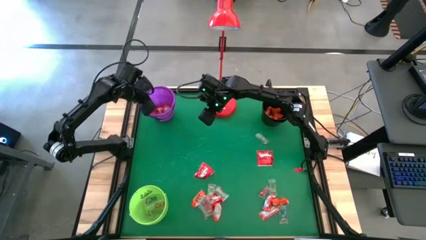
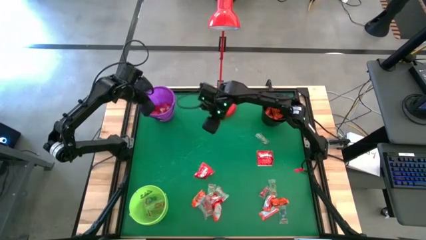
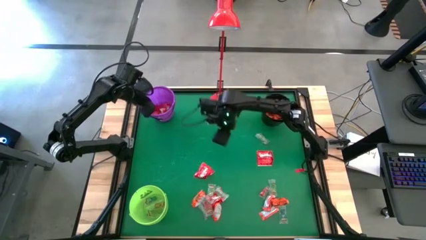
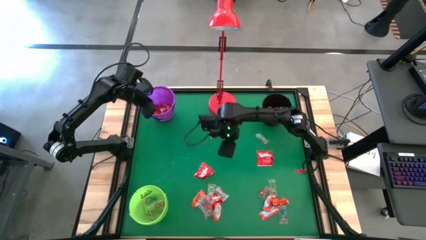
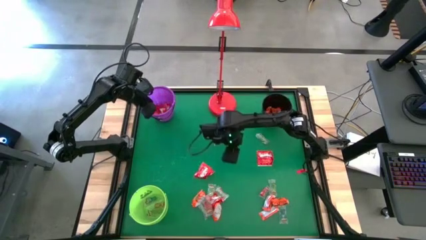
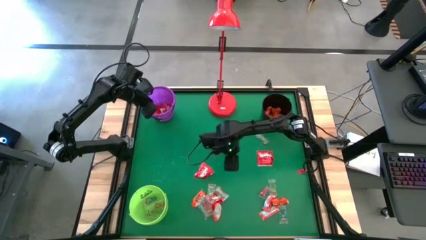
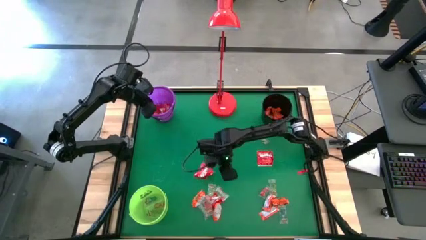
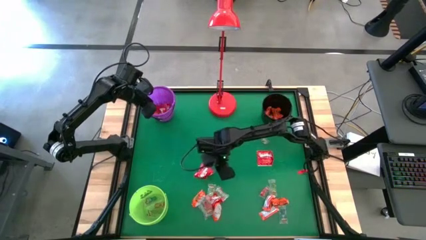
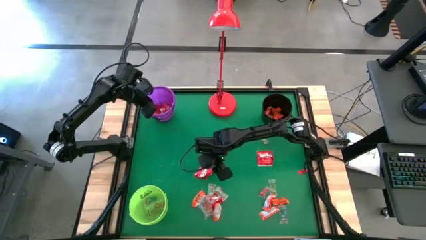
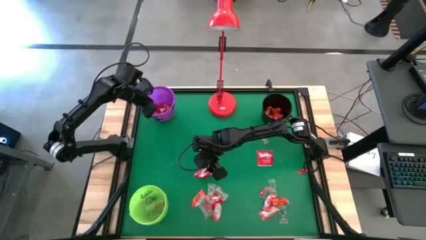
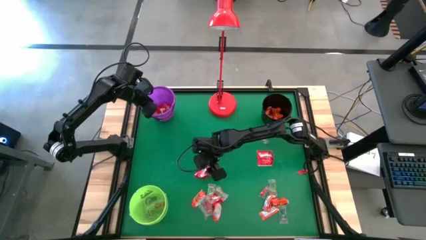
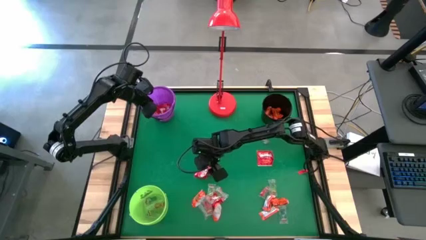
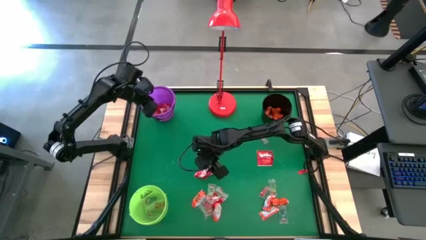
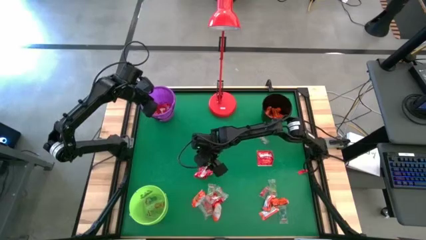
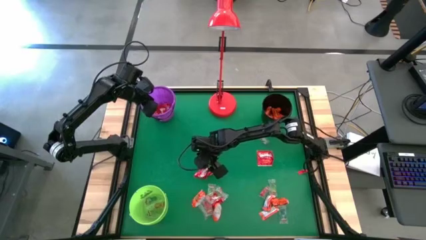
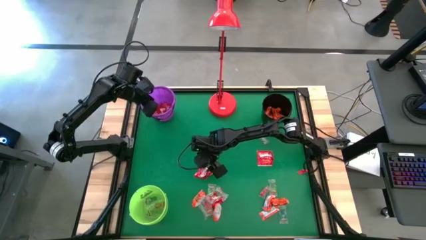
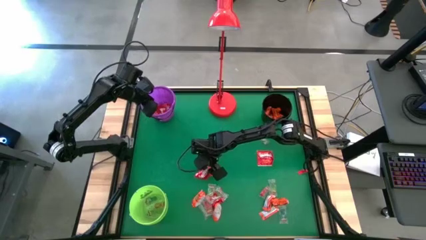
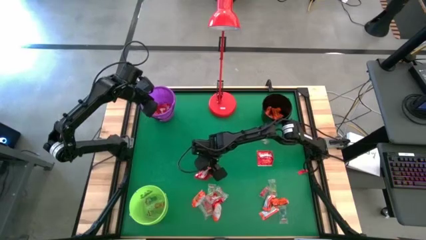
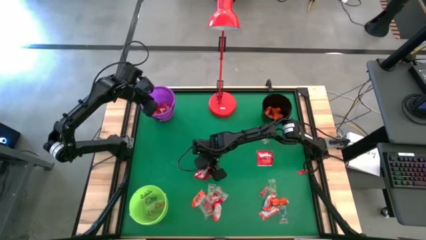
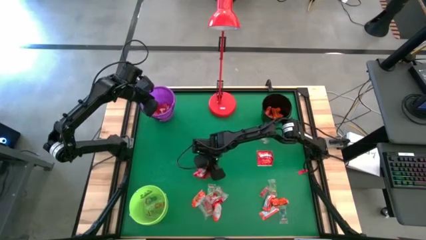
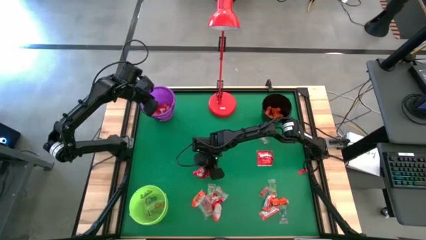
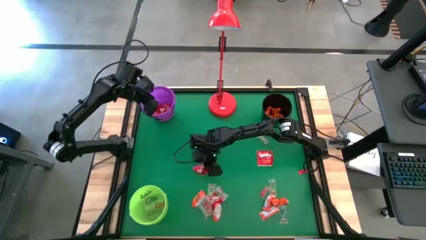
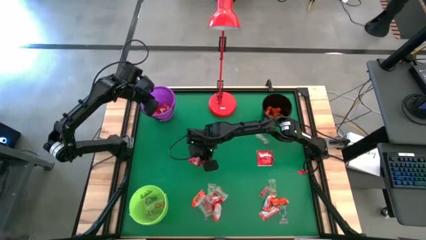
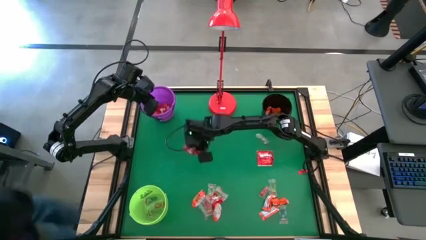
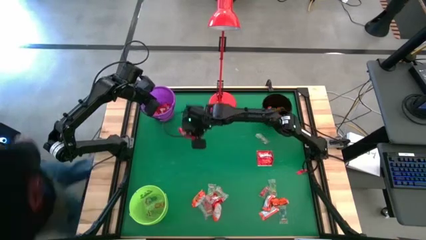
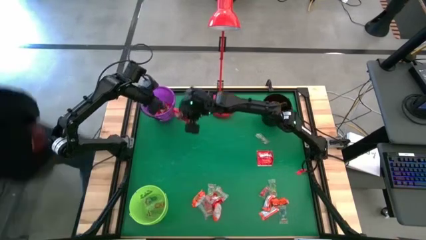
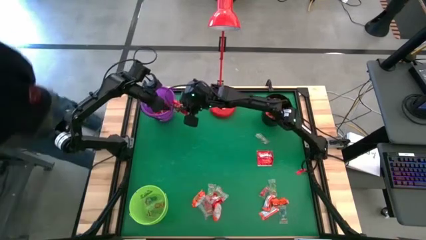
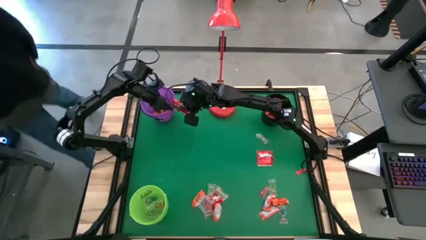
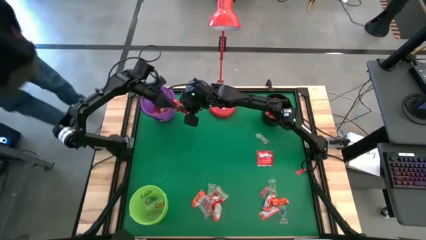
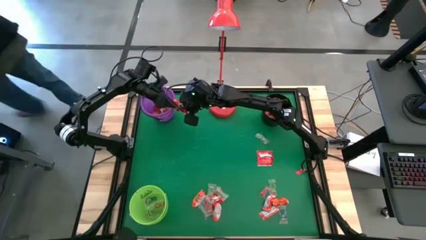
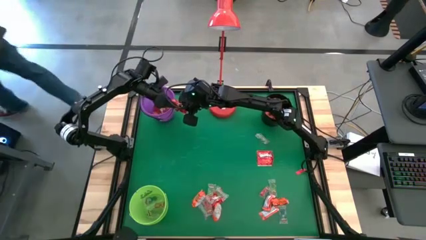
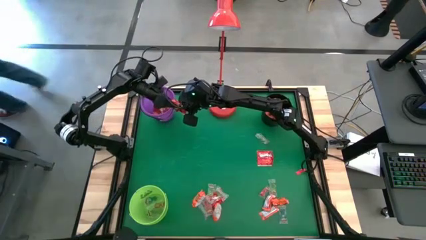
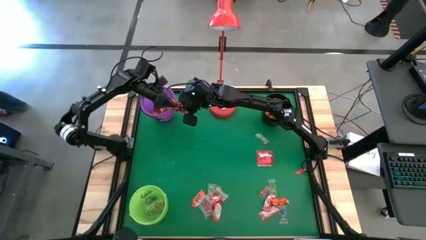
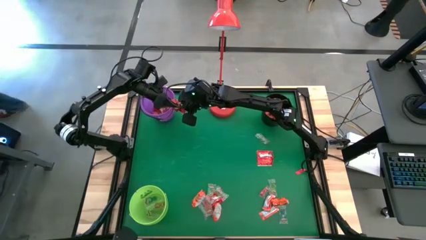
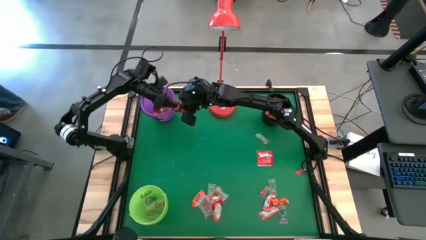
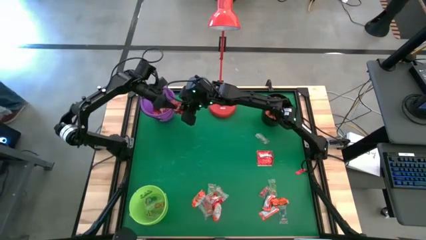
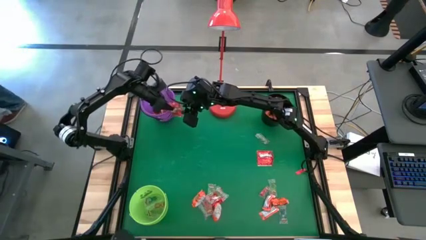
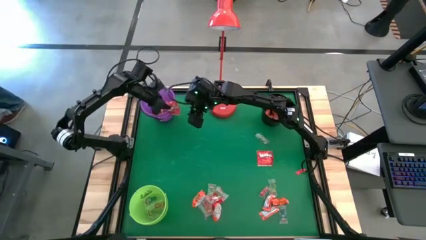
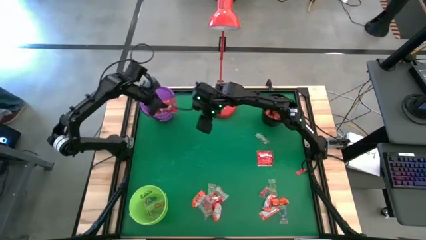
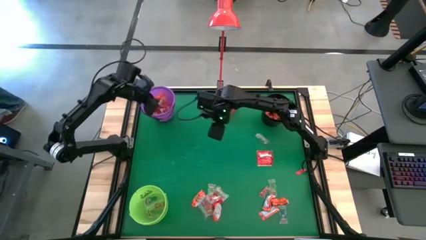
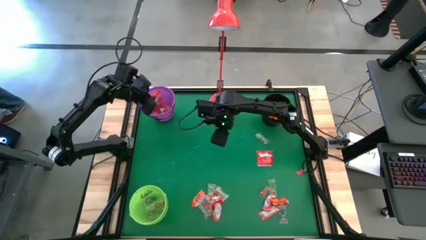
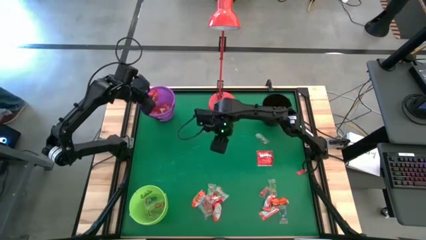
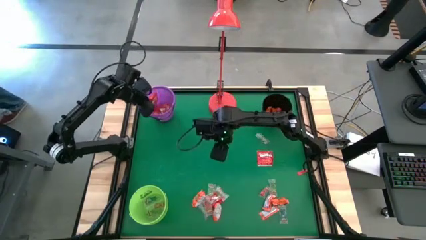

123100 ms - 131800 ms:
Task: Sort candy
Put the red candy into the violet bucket

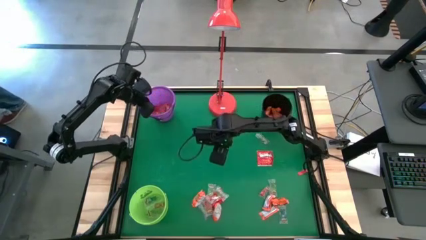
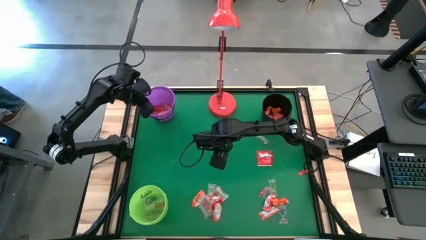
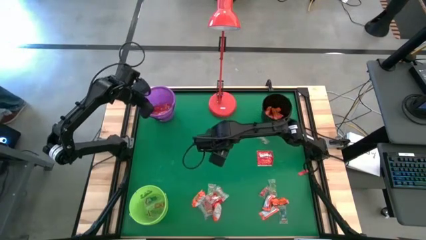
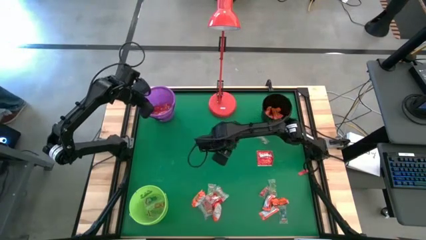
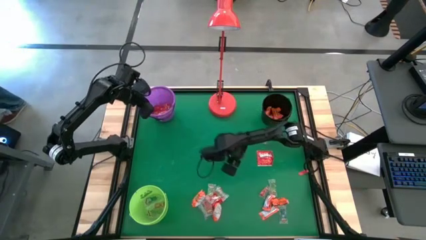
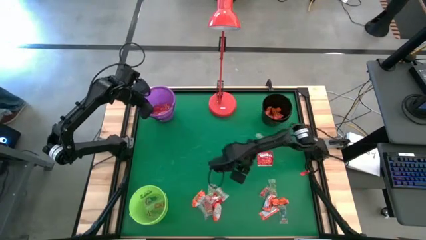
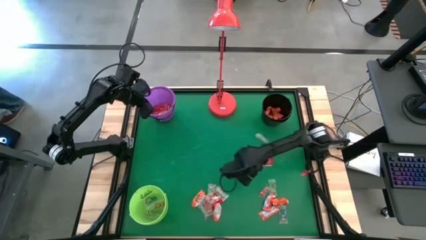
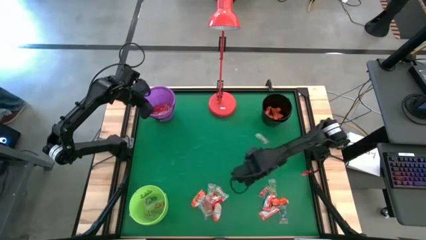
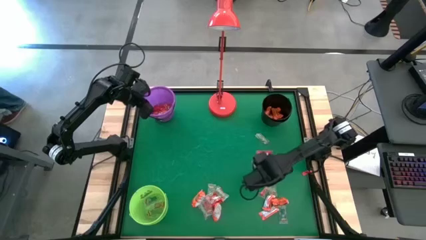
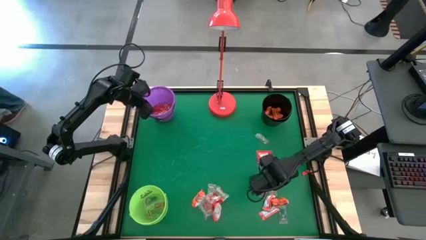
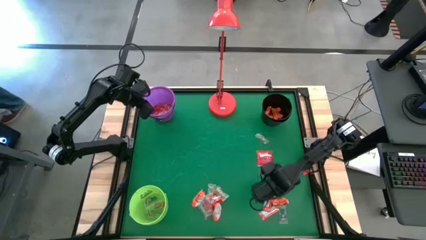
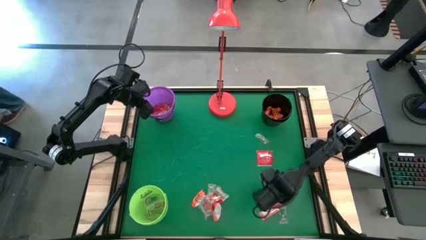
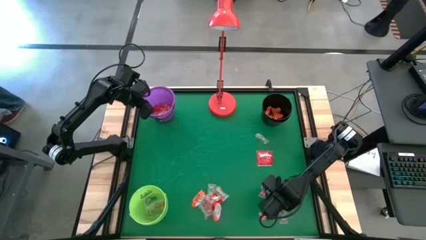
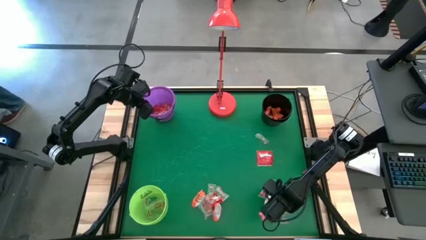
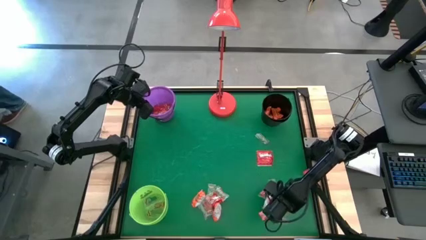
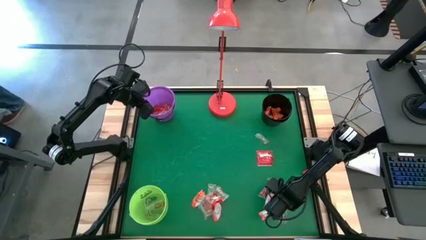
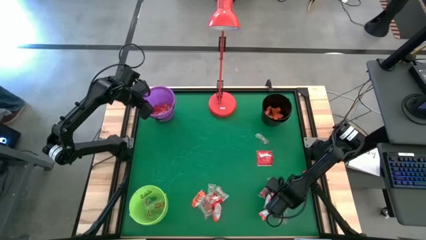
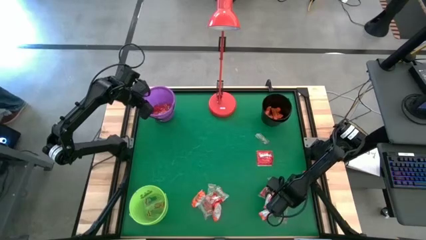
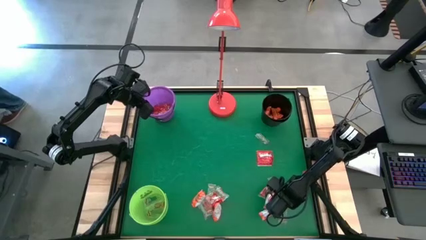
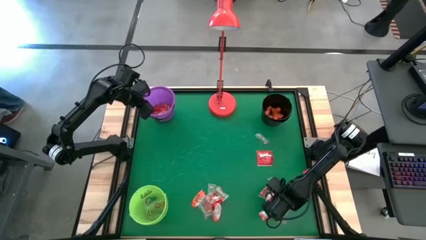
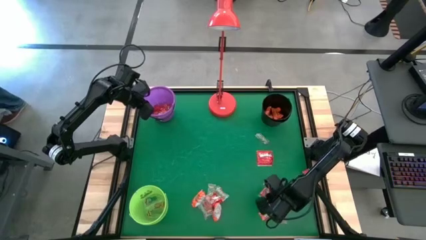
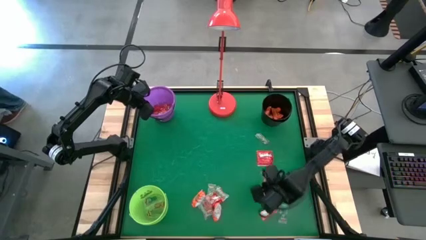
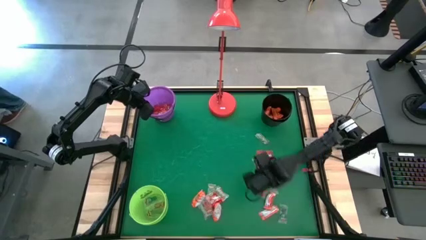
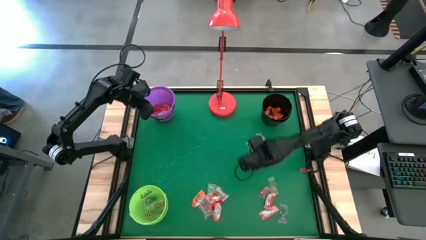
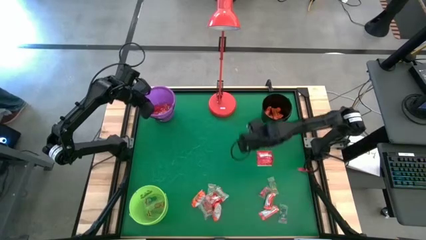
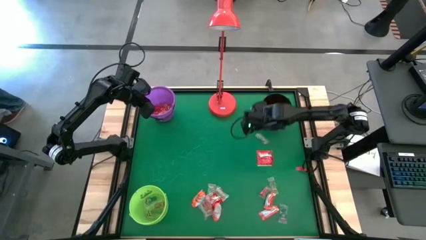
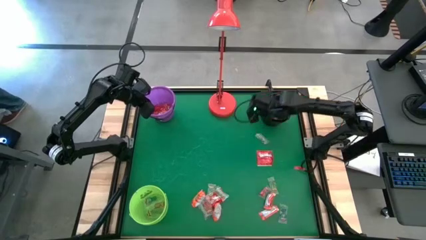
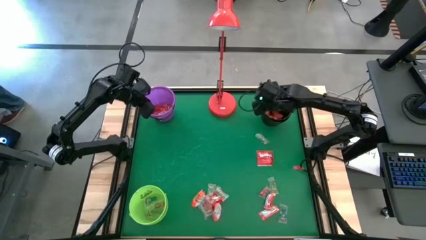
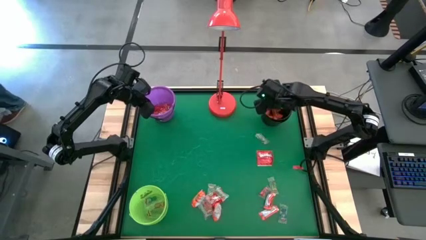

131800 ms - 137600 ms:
Put the orange chocolate into the black bucket
